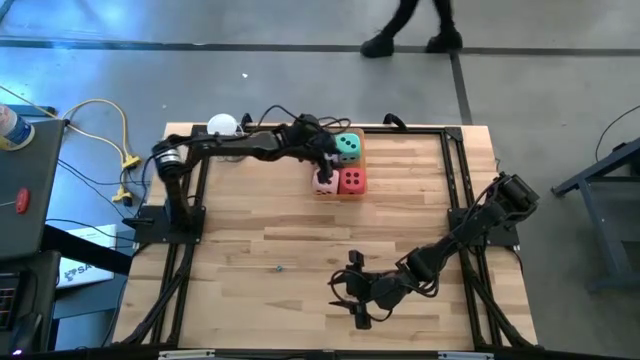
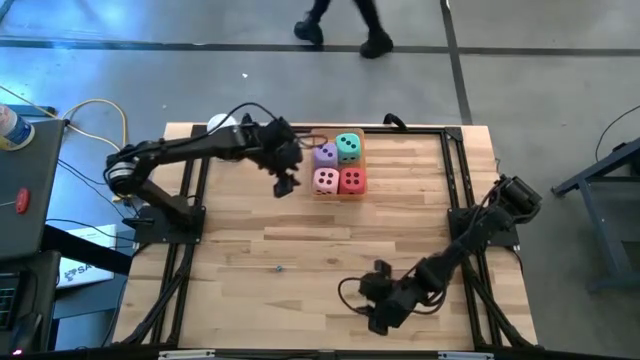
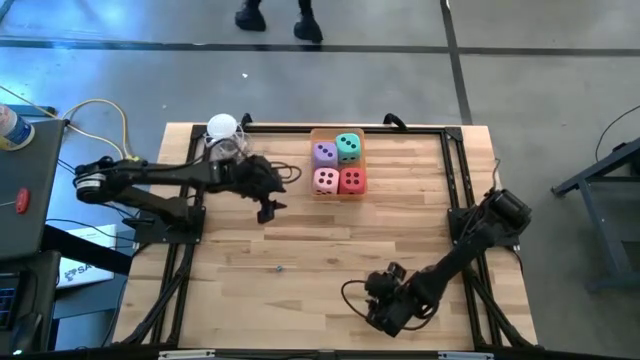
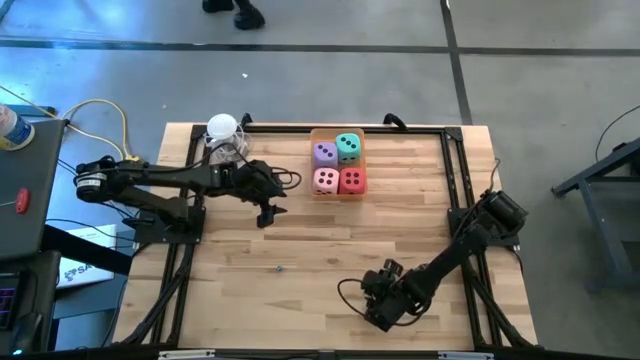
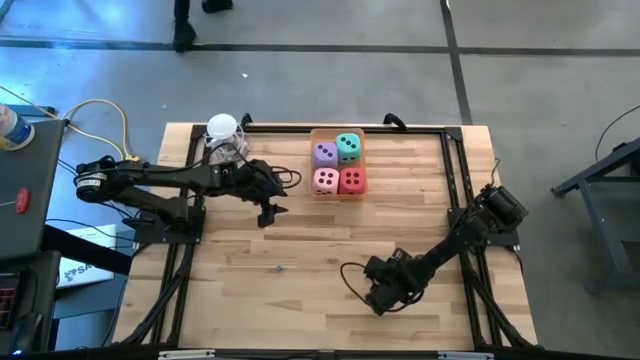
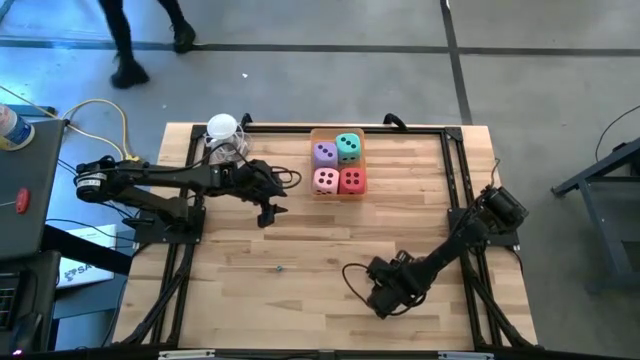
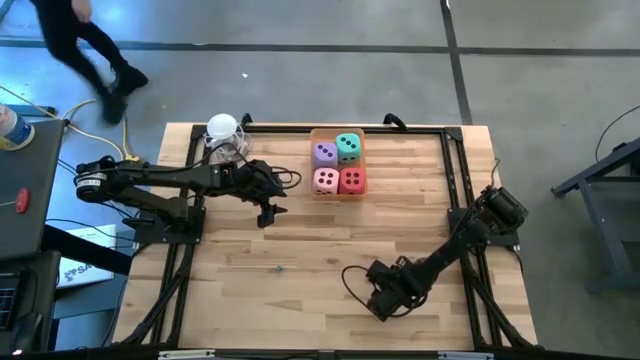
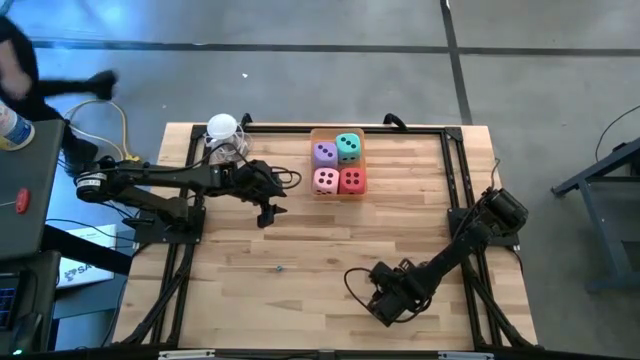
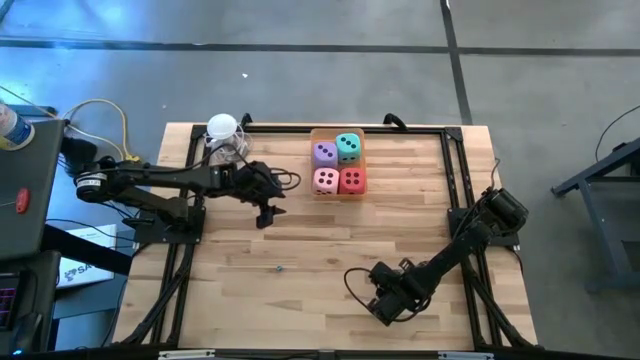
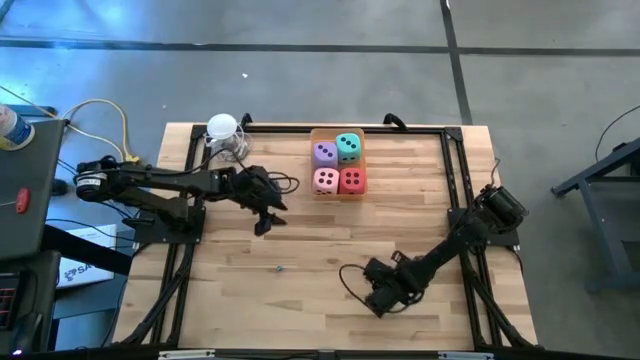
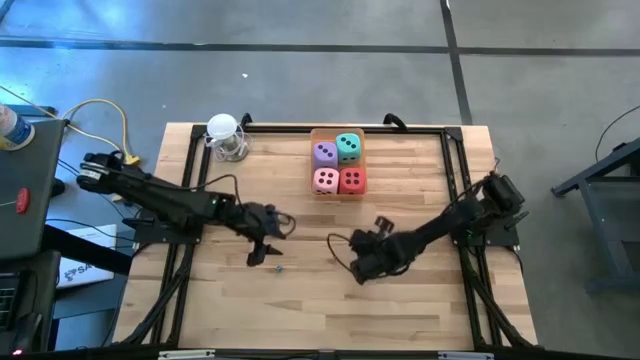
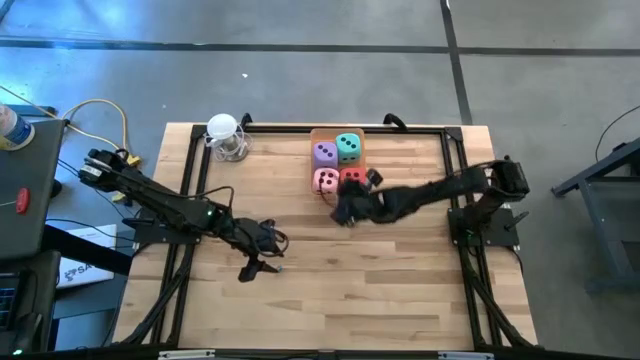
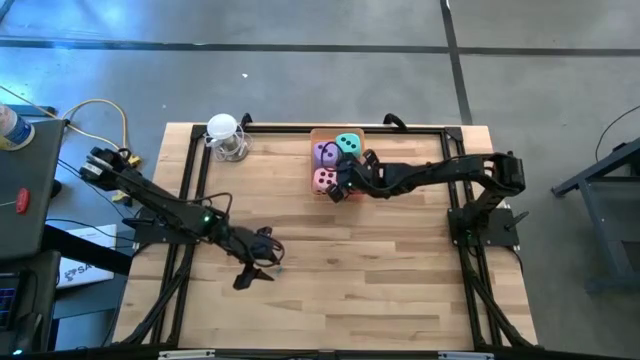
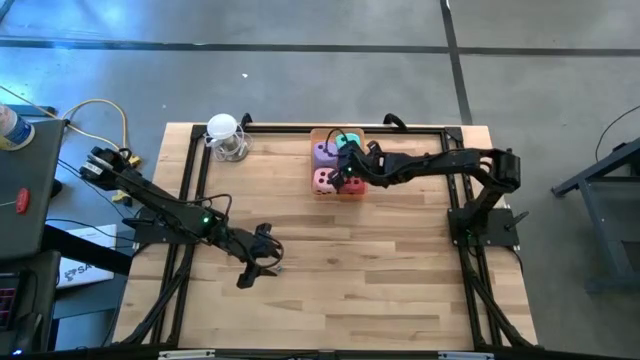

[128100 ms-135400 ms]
Task: Pick & Place Dice
Put the blue die into the orange bin

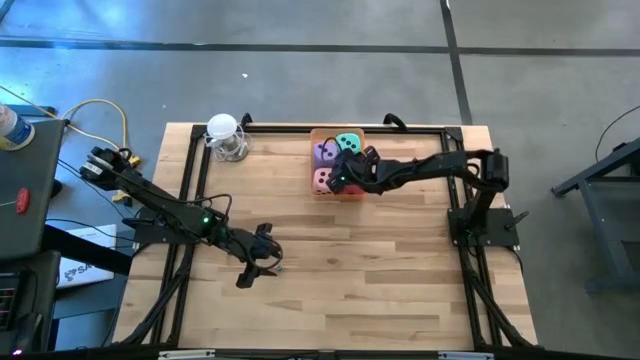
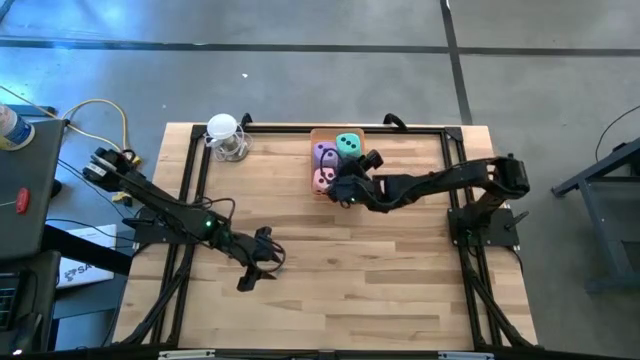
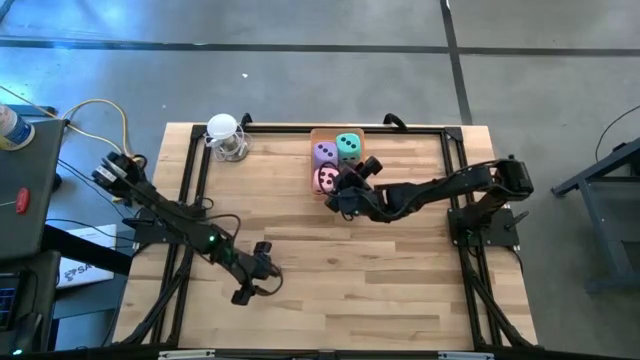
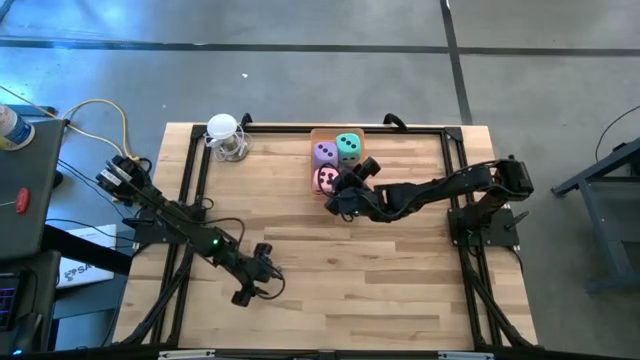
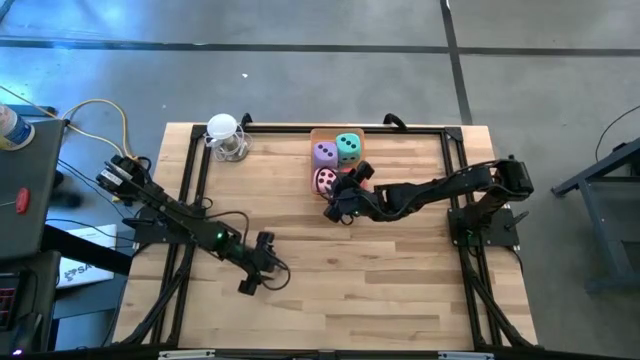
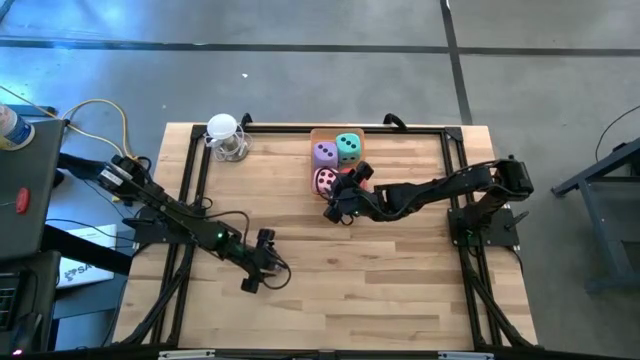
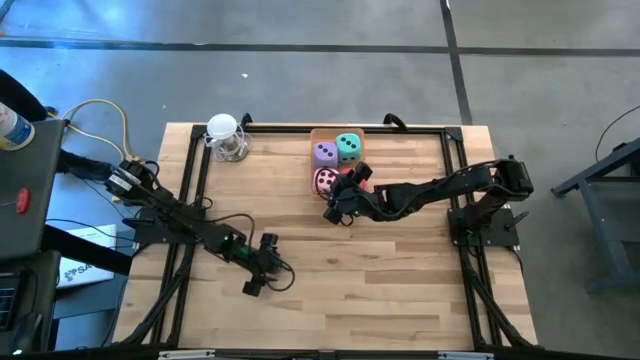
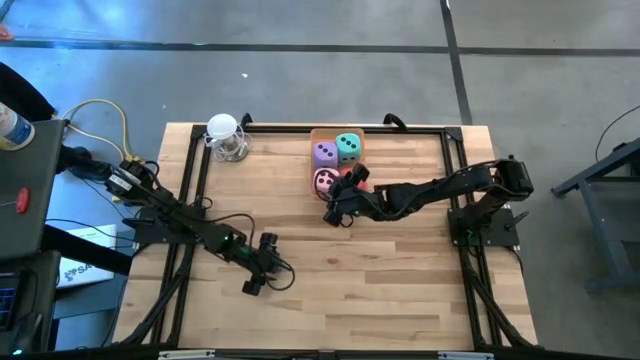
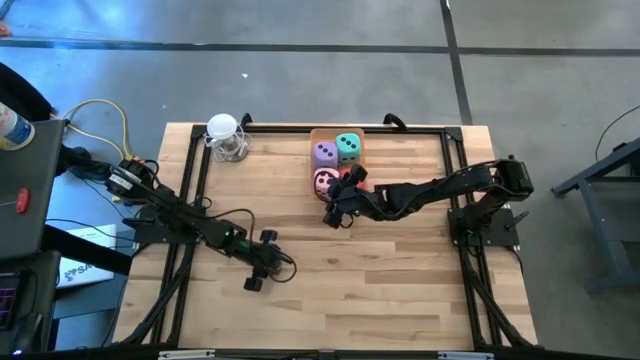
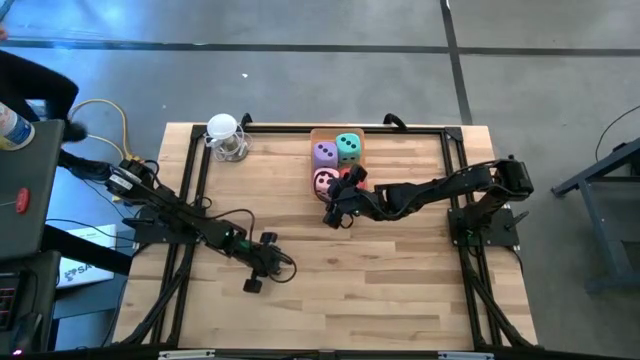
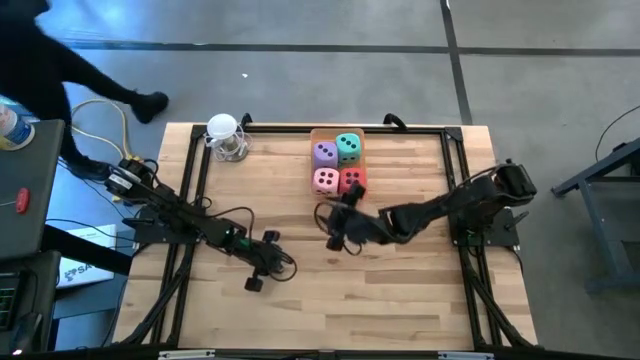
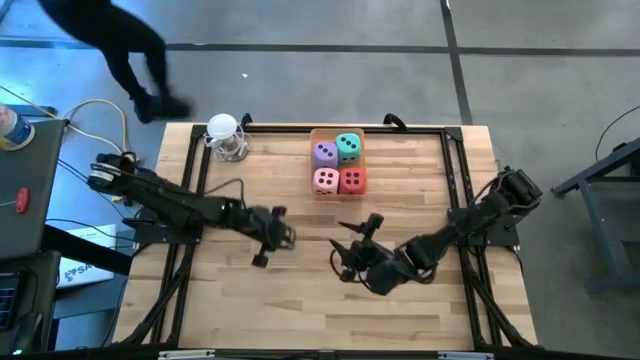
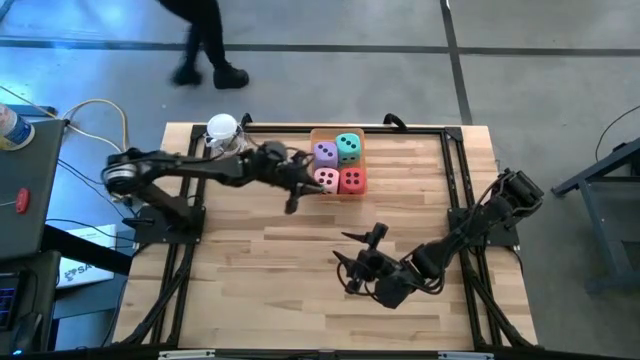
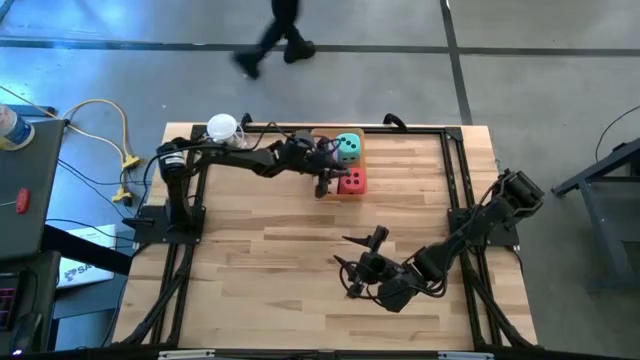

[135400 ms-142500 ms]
Put the blue die into the orange bin

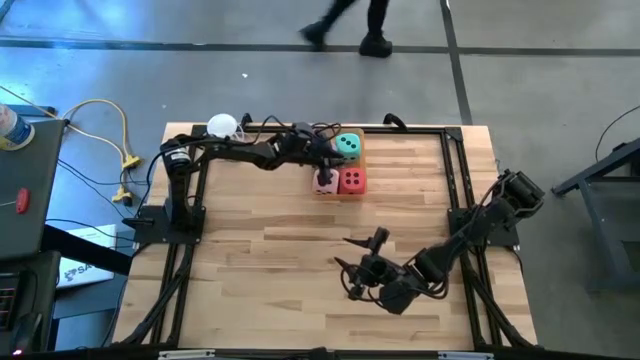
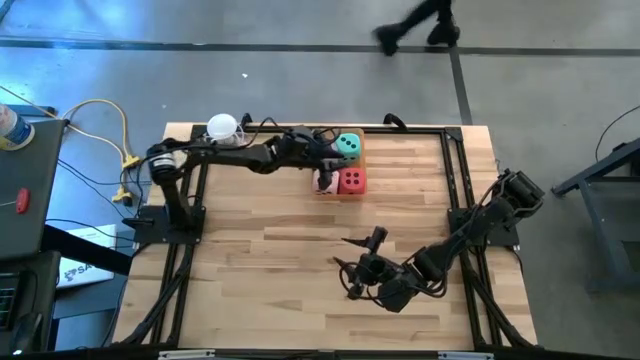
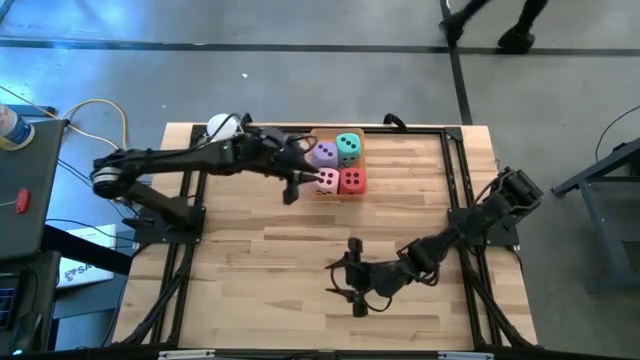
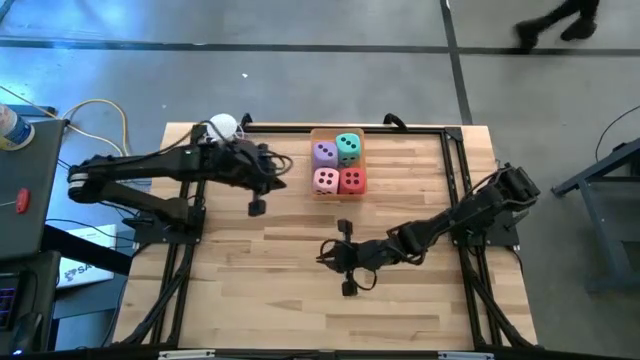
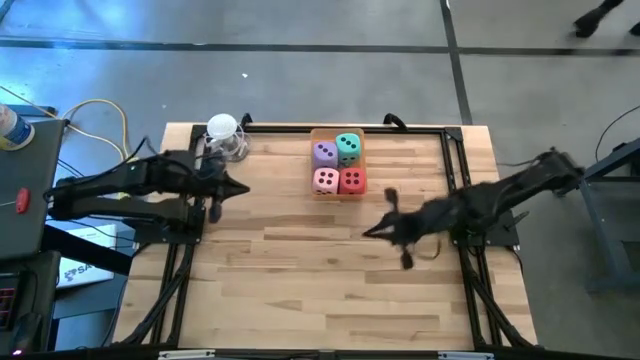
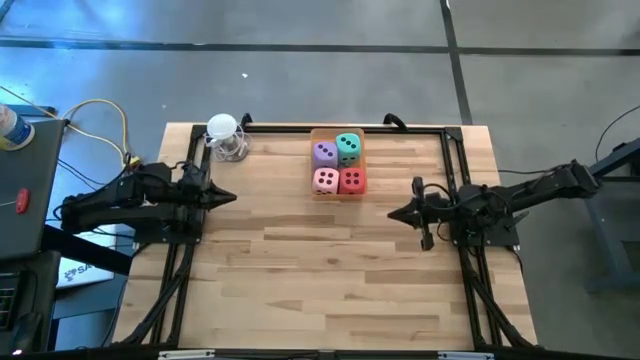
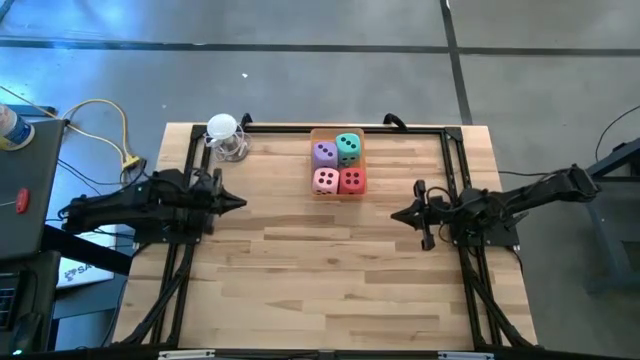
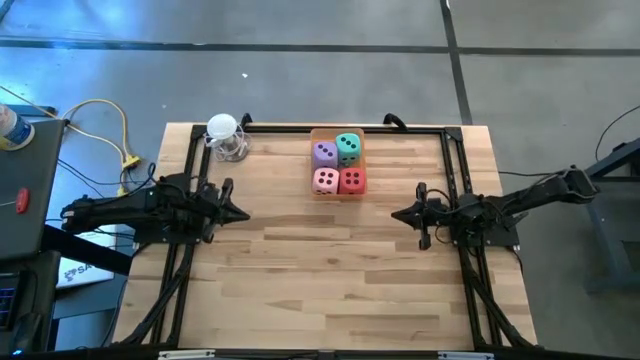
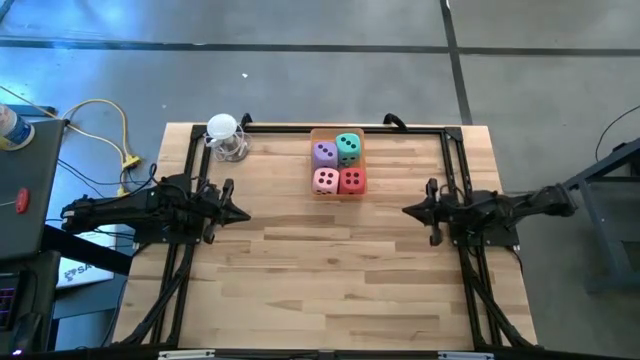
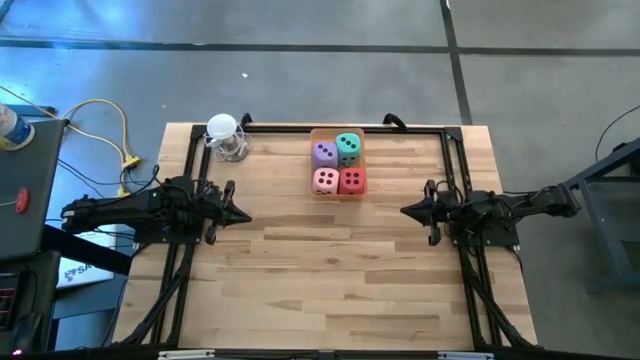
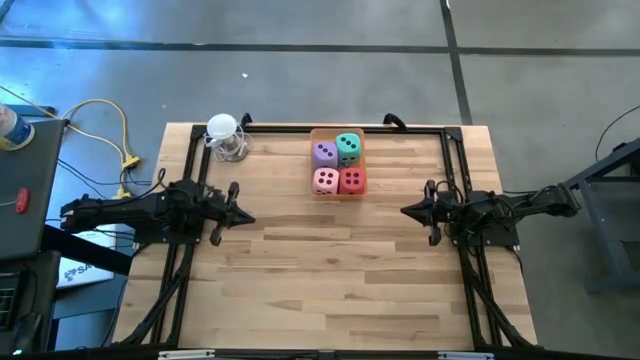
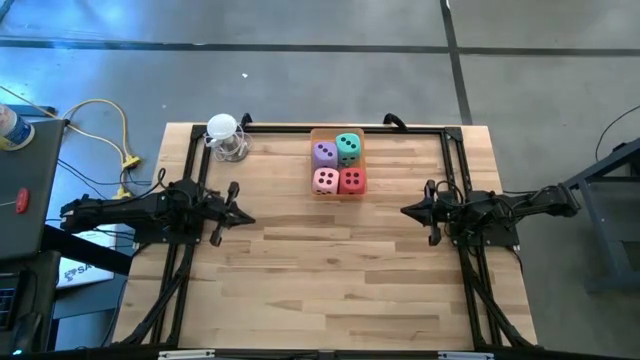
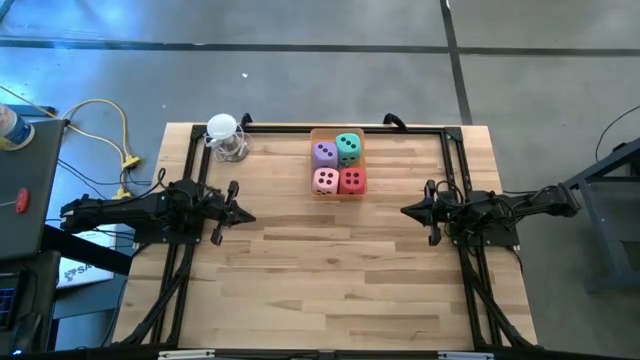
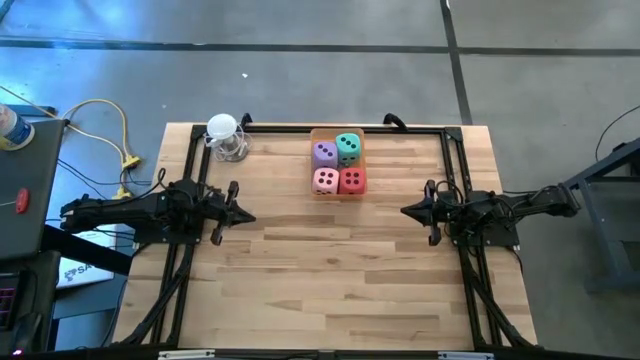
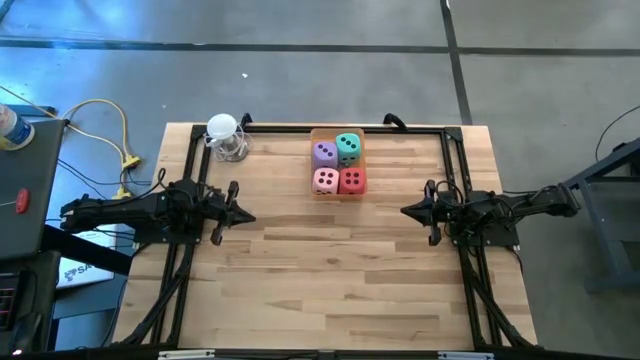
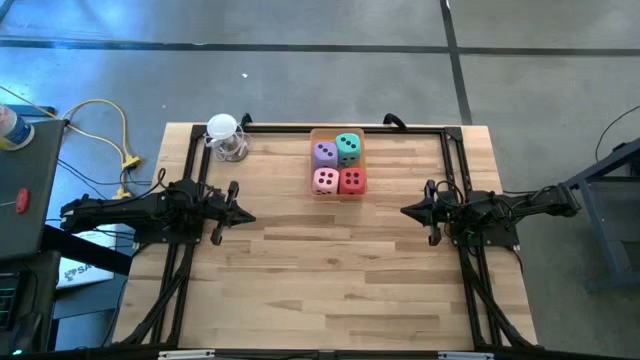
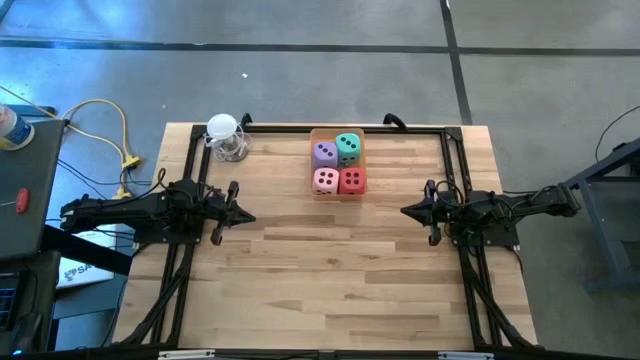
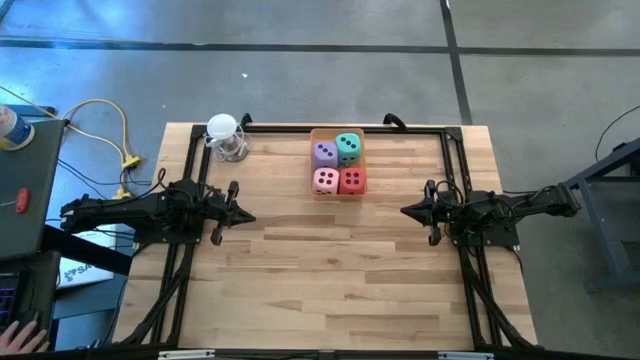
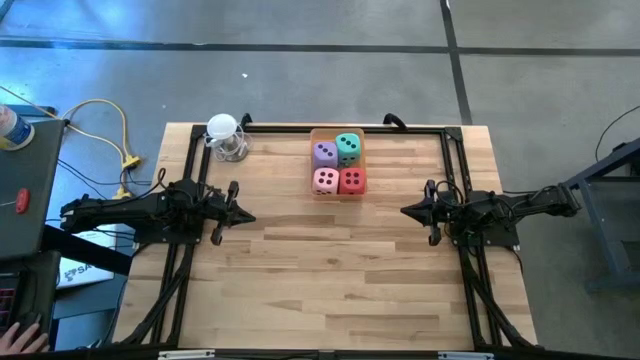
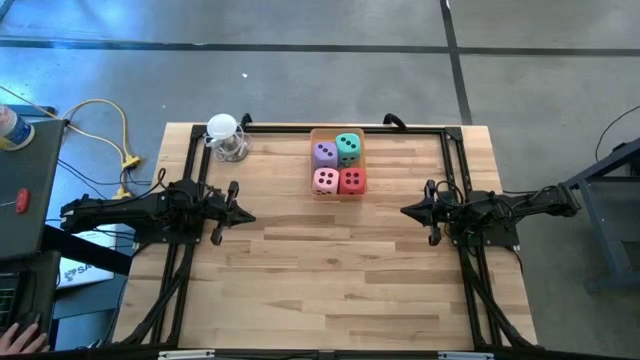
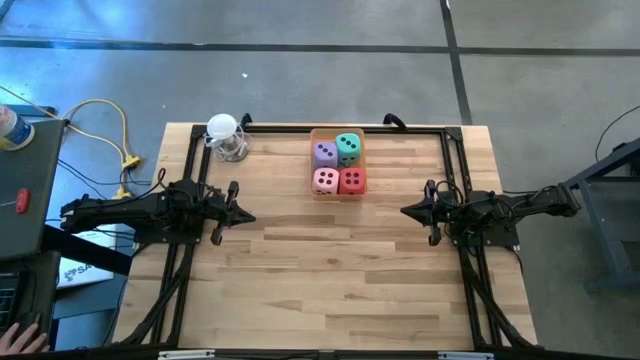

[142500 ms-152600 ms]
Return to Home Position
